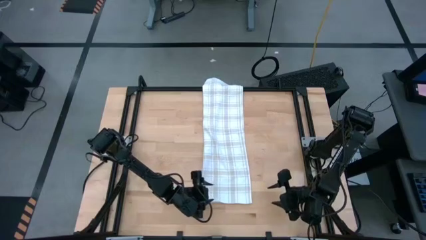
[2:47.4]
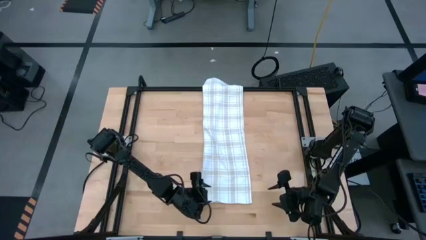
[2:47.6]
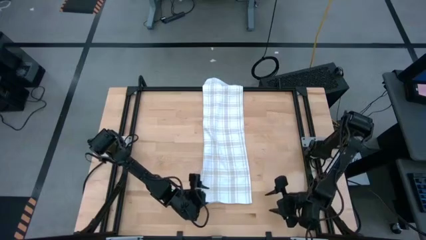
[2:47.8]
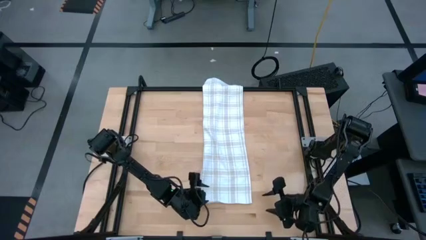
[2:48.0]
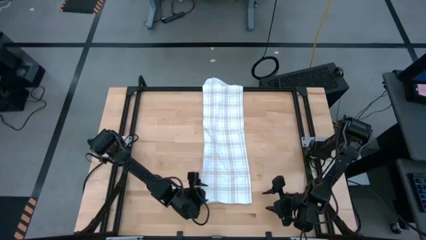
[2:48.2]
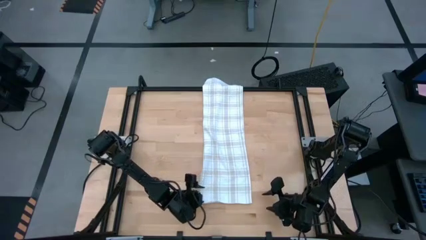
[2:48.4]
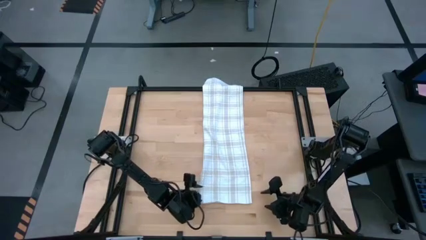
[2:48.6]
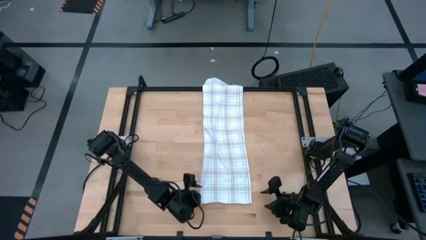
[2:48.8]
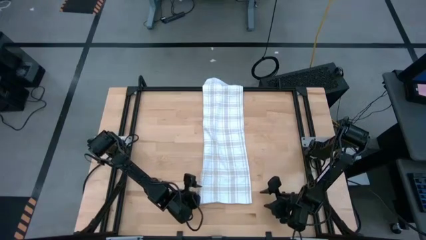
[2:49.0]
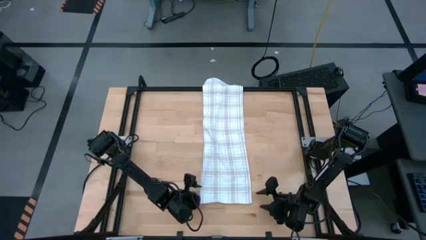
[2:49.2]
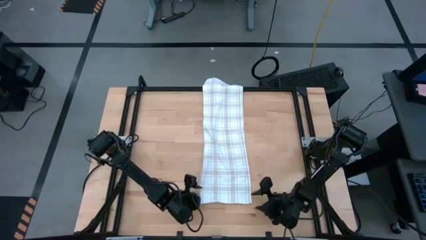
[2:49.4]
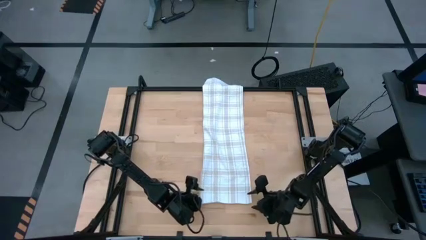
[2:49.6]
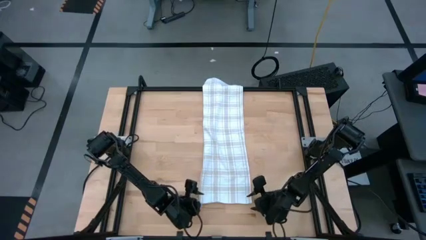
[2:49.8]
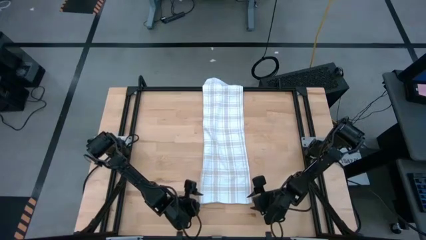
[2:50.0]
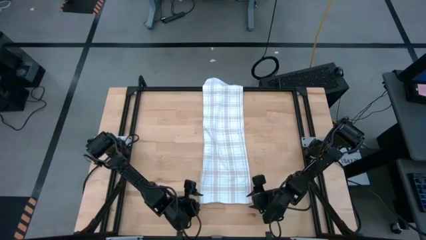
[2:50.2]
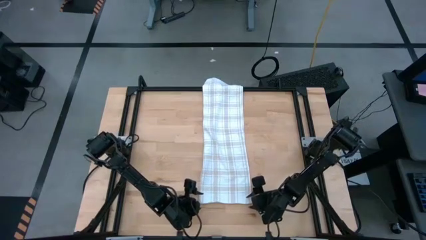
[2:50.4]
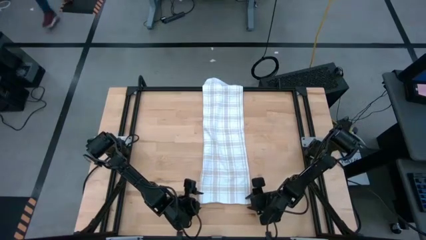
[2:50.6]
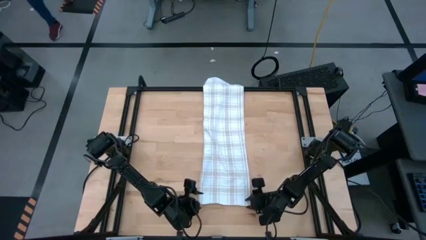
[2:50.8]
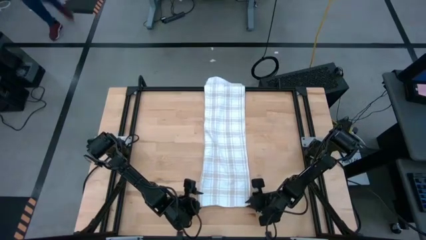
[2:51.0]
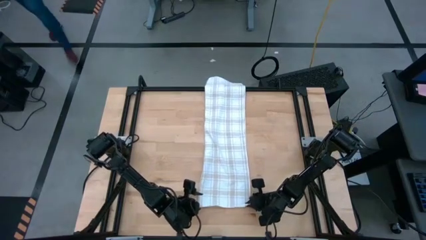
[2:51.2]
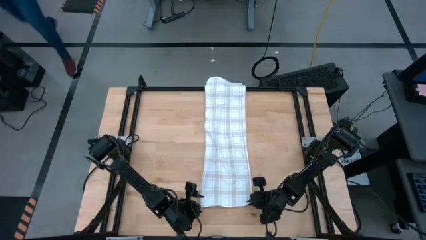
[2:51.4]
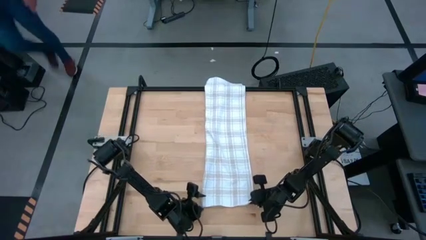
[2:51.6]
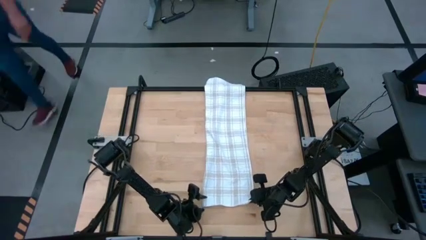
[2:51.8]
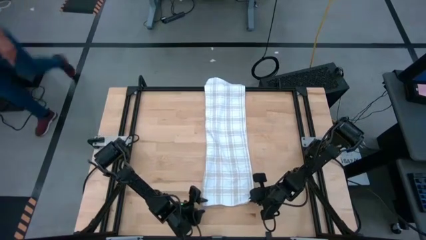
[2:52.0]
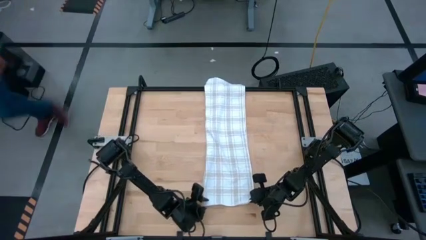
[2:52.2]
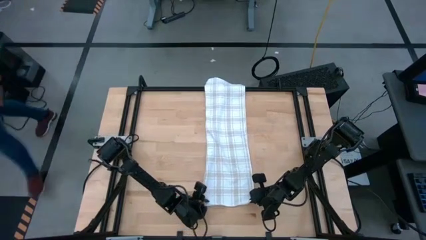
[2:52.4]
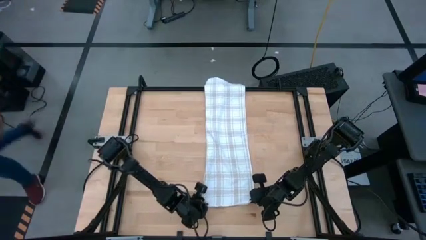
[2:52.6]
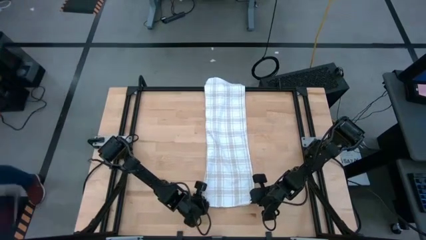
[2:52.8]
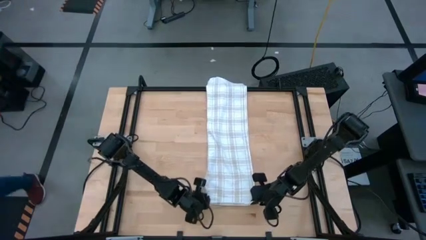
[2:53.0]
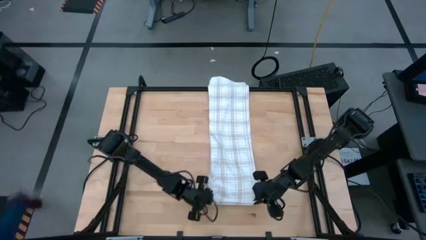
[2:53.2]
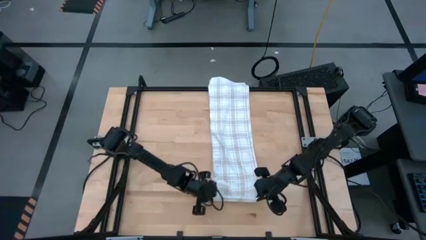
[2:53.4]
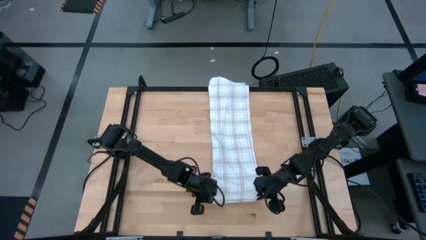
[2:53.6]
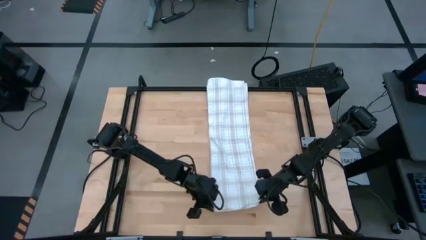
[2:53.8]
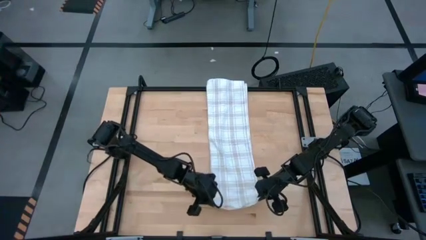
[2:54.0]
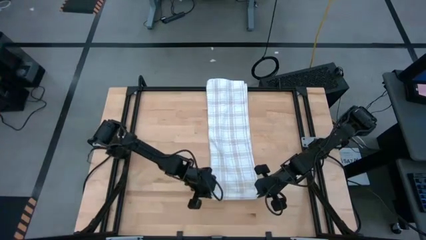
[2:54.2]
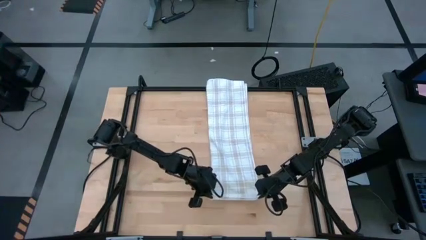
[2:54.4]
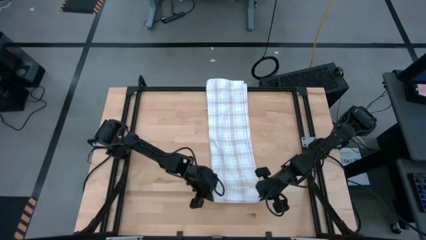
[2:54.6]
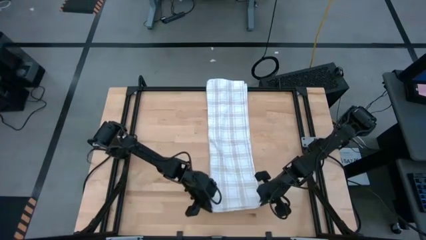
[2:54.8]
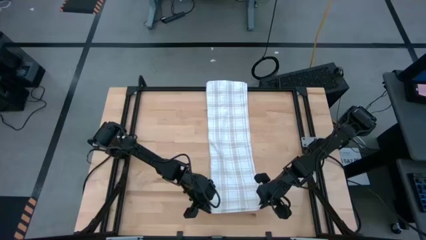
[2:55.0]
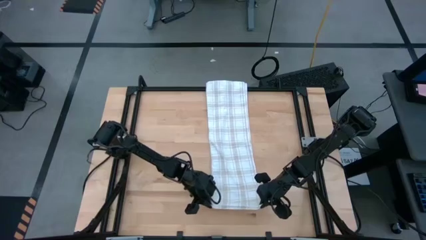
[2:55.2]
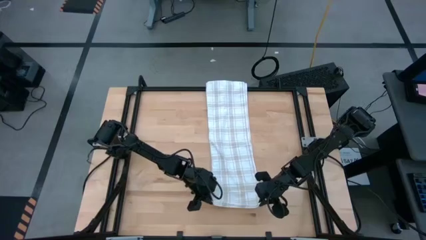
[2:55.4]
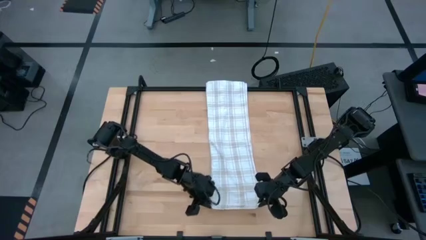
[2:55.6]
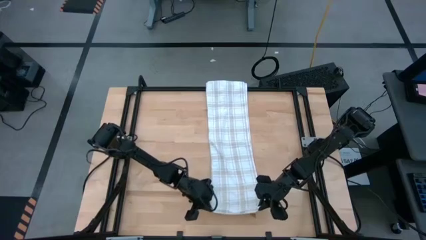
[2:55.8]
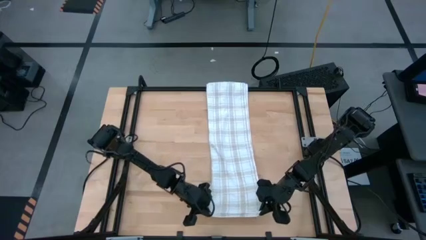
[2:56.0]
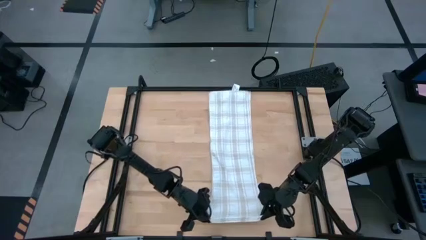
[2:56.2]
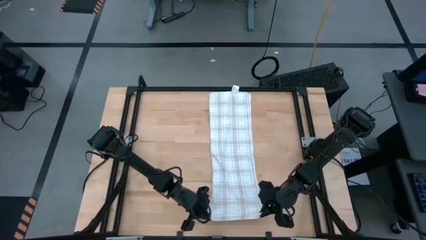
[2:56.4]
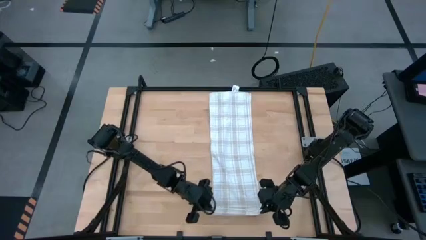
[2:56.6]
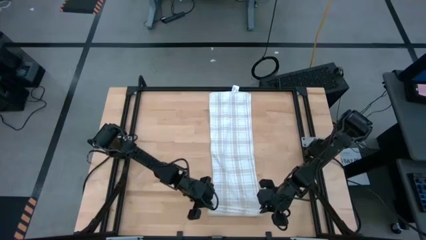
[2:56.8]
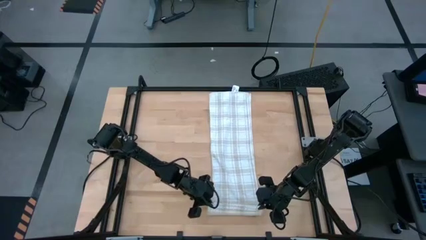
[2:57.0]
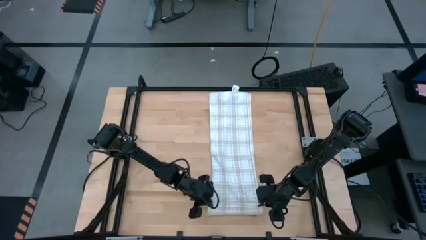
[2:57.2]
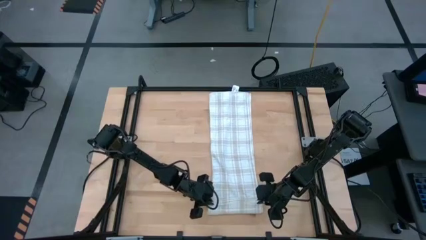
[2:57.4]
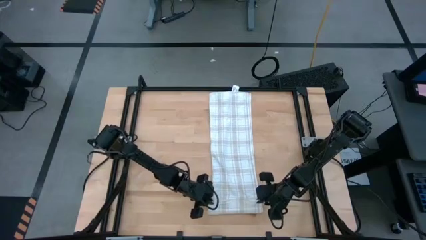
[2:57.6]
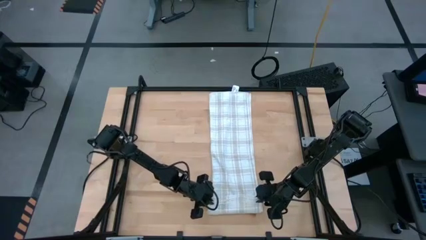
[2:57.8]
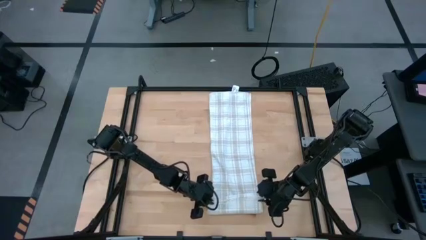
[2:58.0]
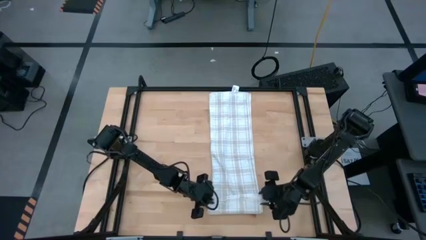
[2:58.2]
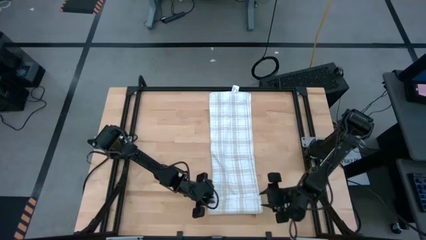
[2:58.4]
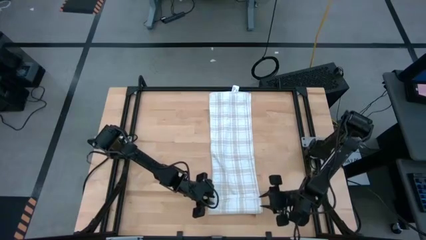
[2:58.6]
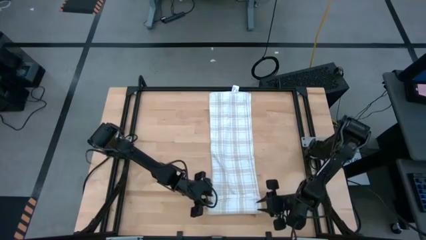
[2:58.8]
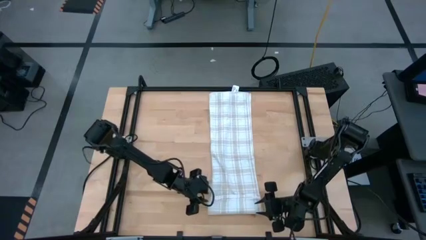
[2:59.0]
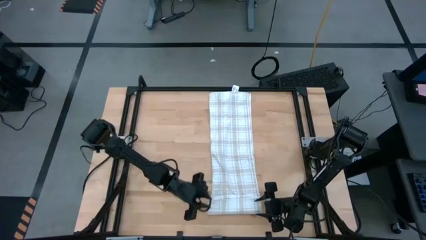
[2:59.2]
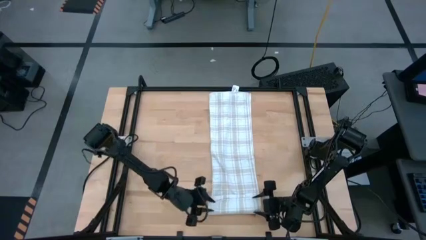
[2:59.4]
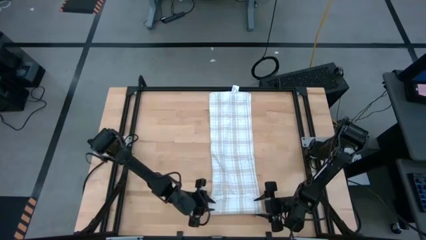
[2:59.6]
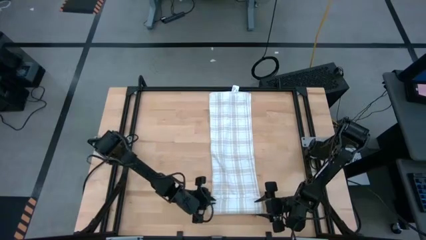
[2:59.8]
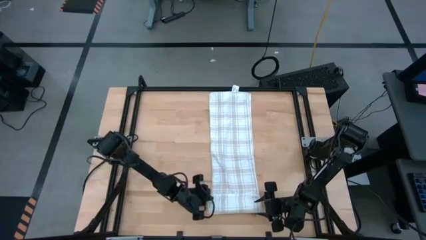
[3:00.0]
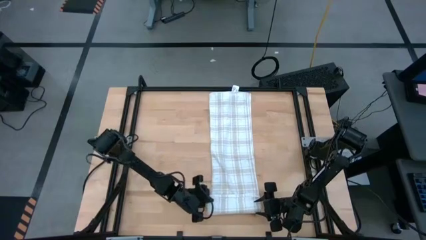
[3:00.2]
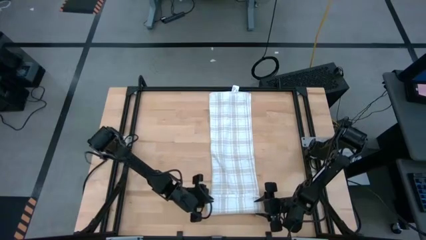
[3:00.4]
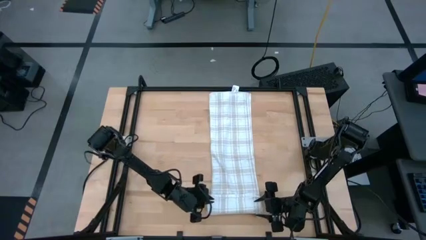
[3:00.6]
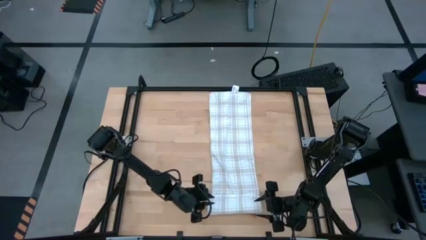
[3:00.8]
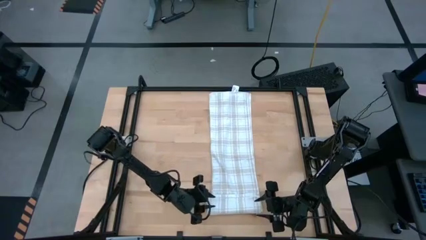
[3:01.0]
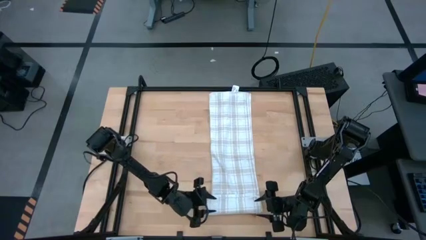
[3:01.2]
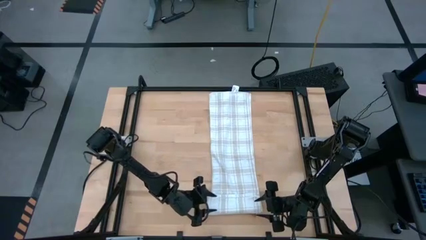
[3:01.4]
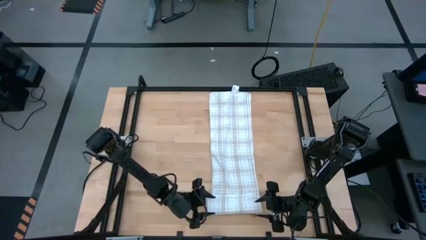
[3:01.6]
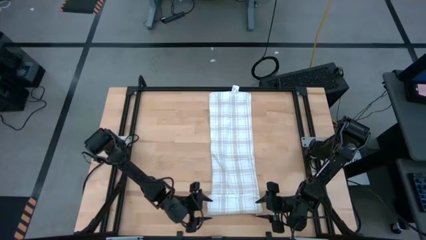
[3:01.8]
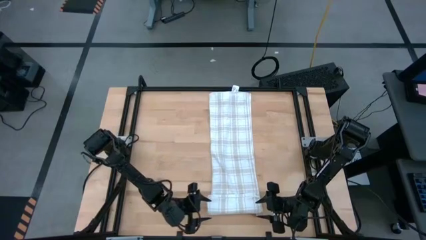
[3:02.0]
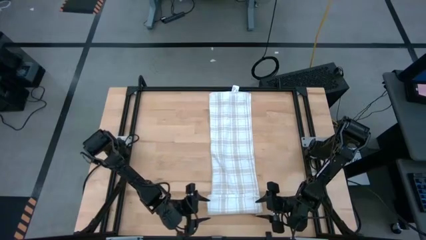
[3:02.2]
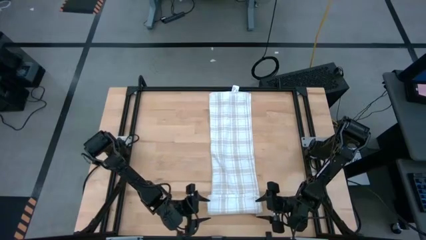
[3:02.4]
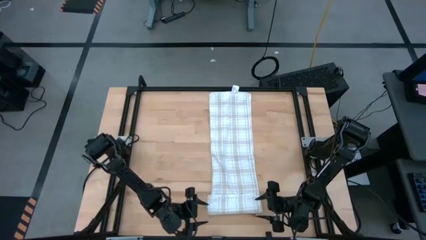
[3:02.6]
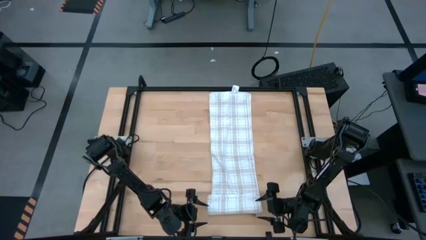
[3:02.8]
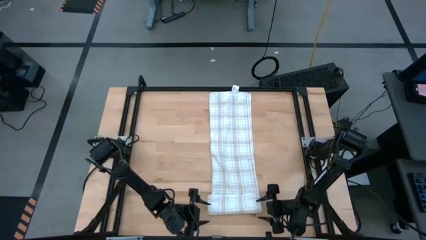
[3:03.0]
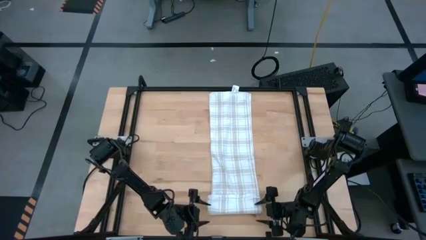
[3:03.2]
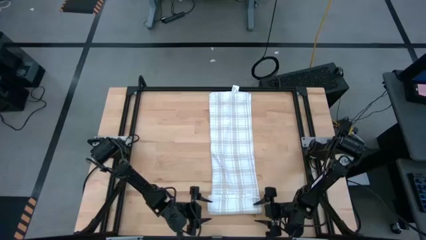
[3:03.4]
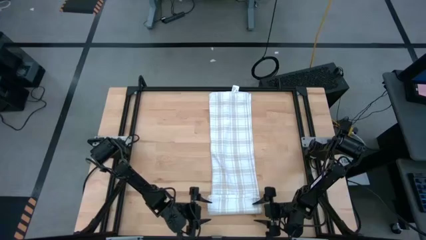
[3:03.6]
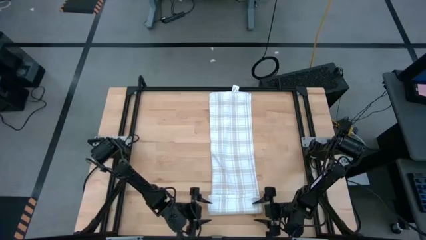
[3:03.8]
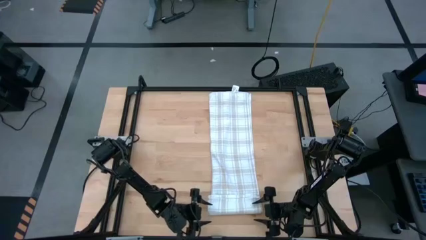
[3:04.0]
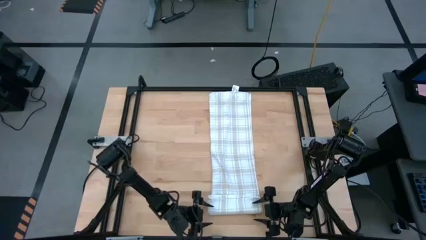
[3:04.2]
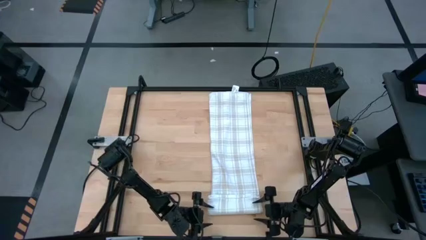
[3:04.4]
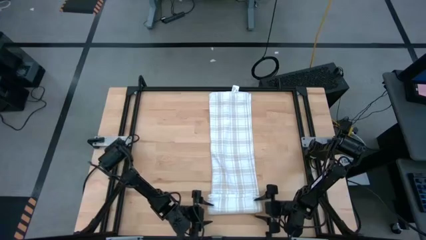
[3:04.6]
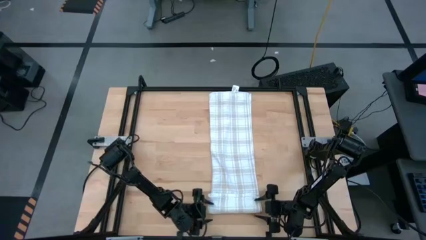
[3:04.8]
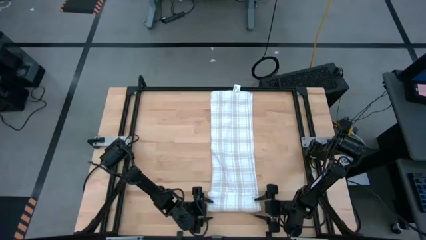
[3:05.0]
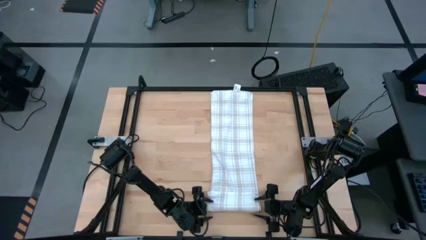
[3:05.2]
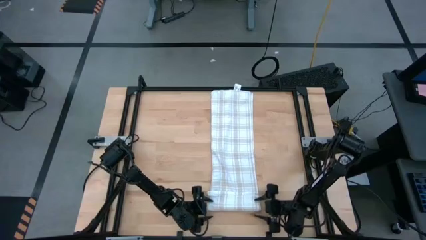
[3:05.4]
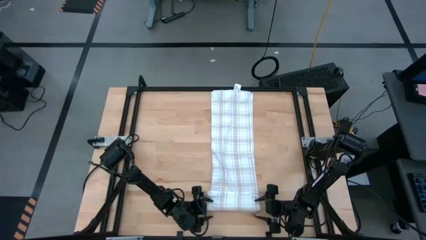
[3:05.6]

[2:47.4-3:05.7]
Task: Roll towel into tight, uniform cylinder
Roll the white towel
